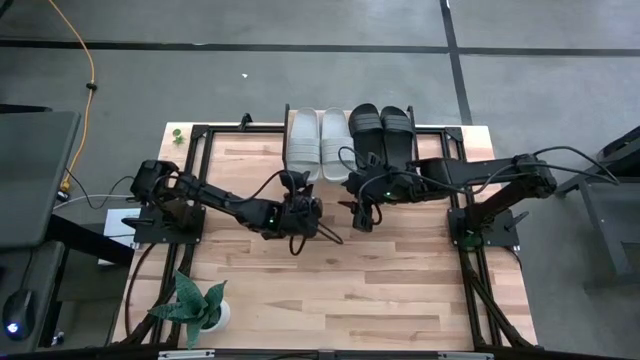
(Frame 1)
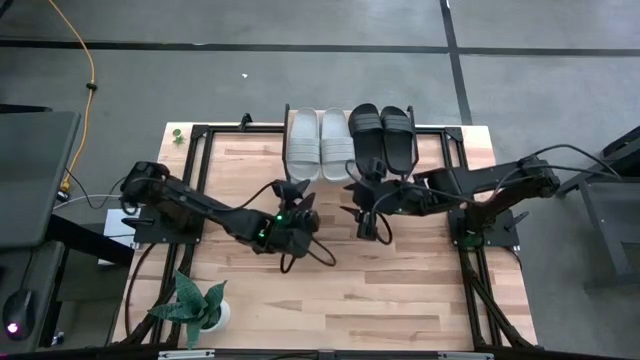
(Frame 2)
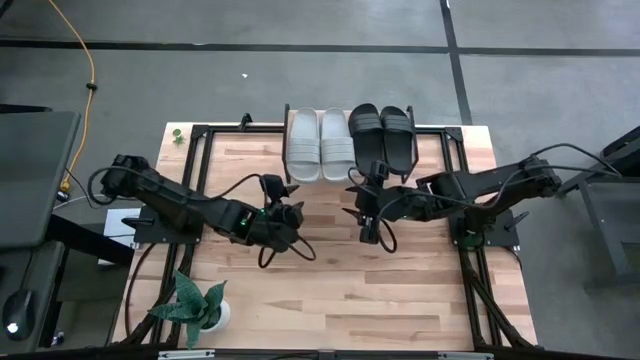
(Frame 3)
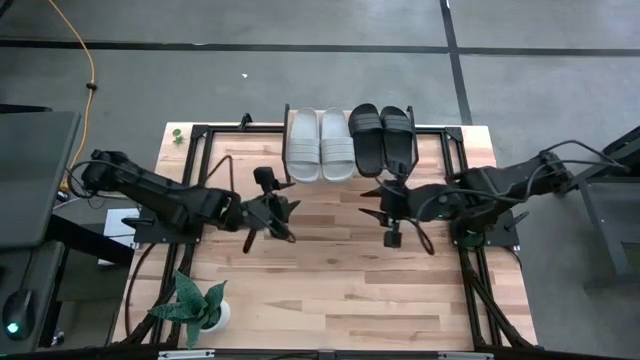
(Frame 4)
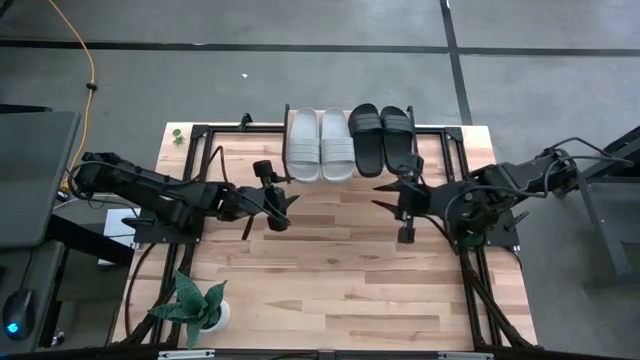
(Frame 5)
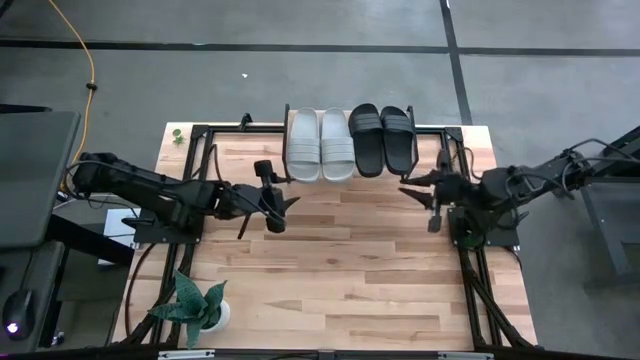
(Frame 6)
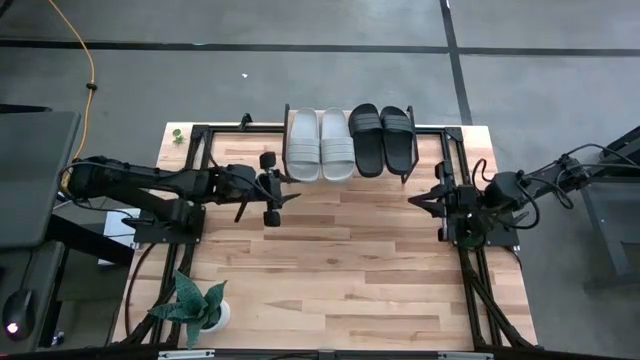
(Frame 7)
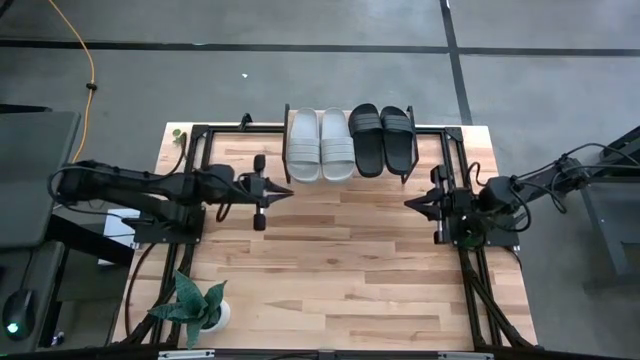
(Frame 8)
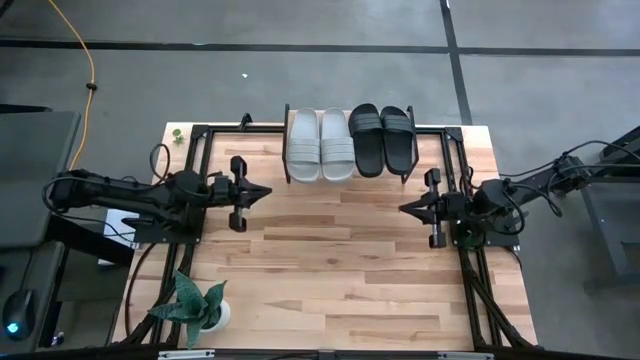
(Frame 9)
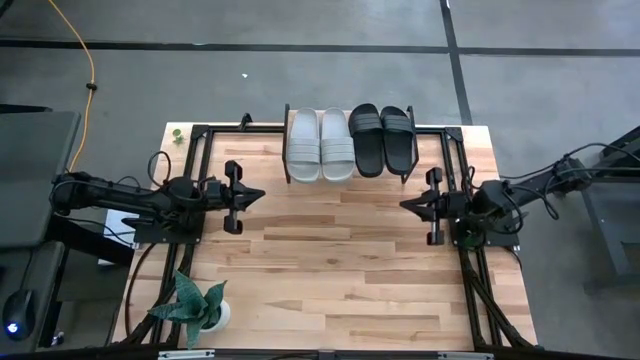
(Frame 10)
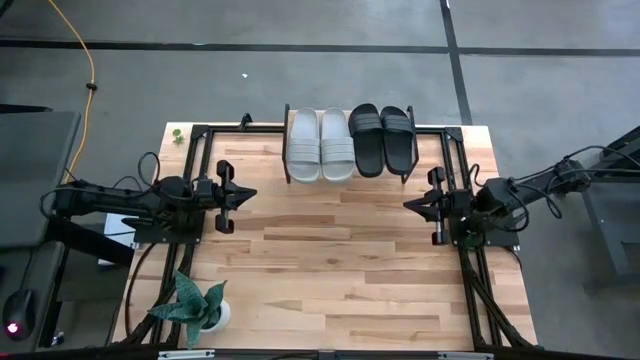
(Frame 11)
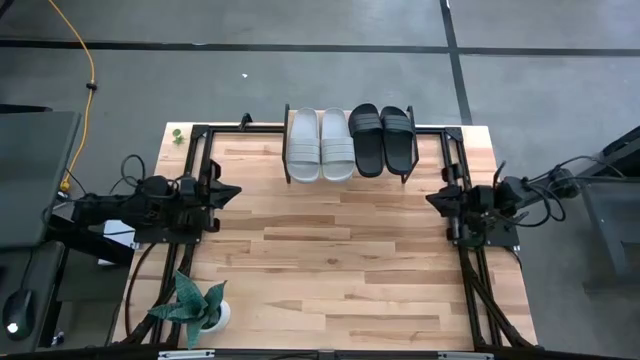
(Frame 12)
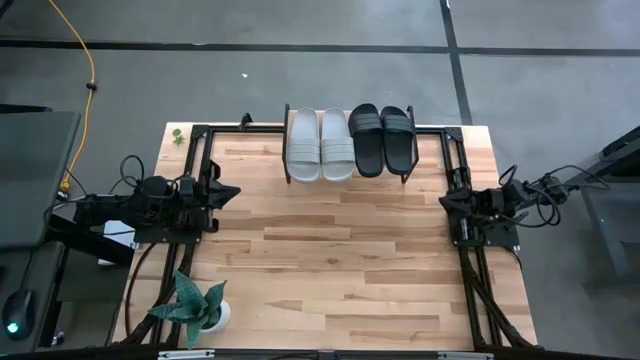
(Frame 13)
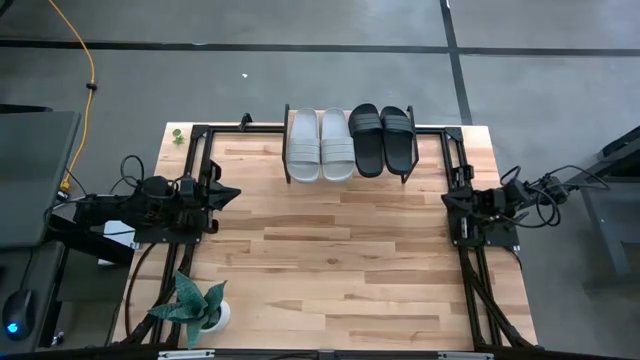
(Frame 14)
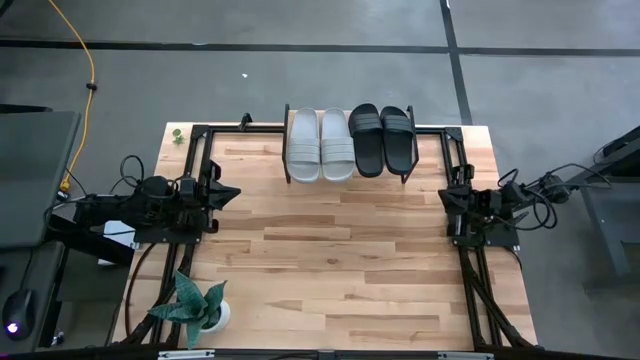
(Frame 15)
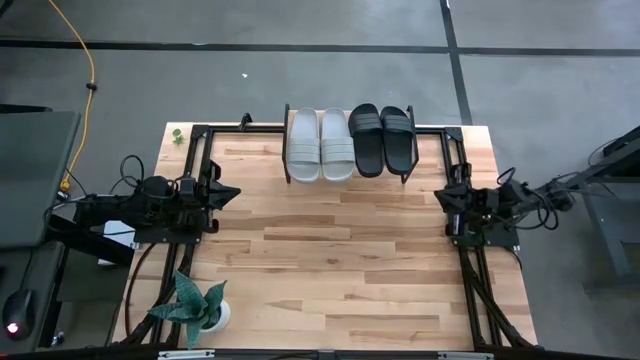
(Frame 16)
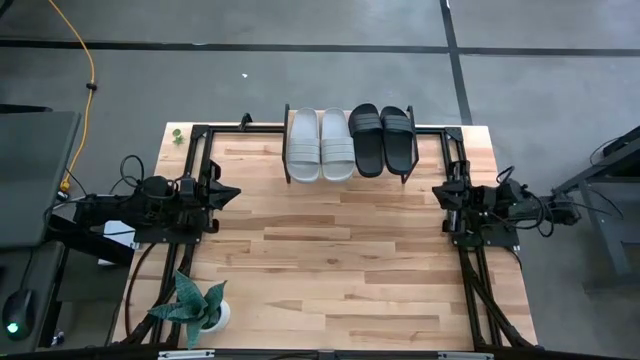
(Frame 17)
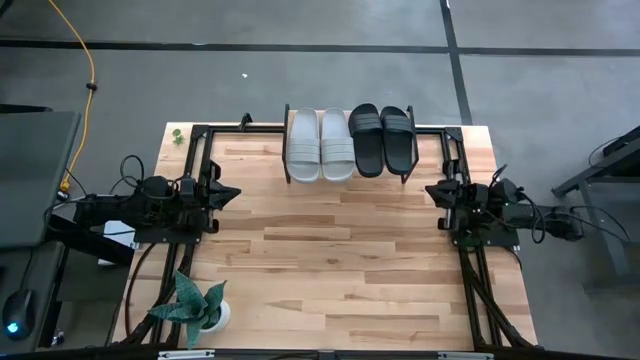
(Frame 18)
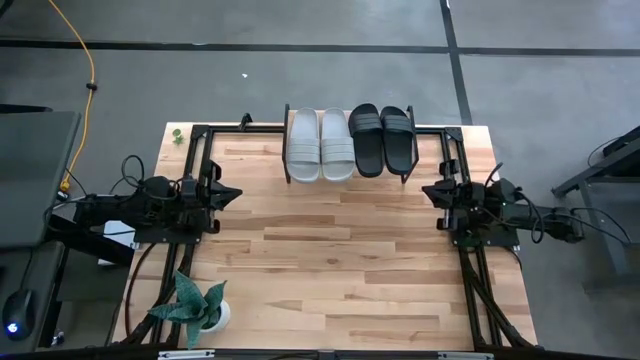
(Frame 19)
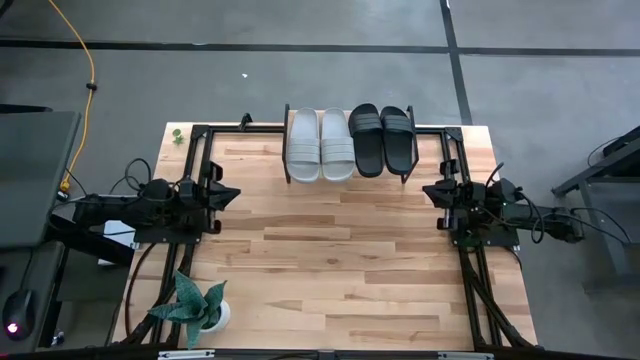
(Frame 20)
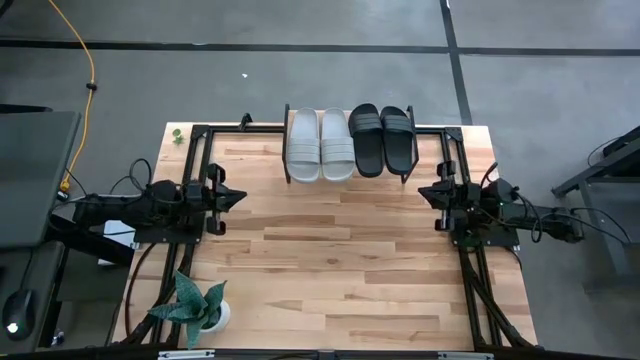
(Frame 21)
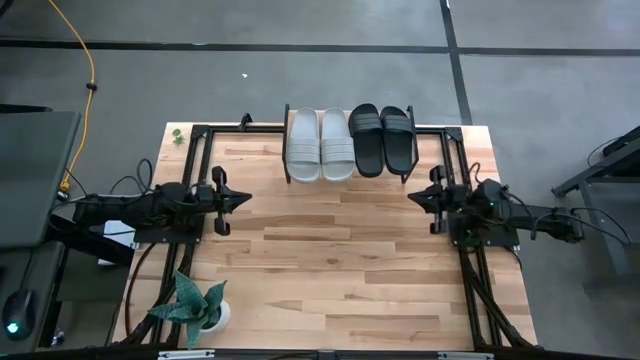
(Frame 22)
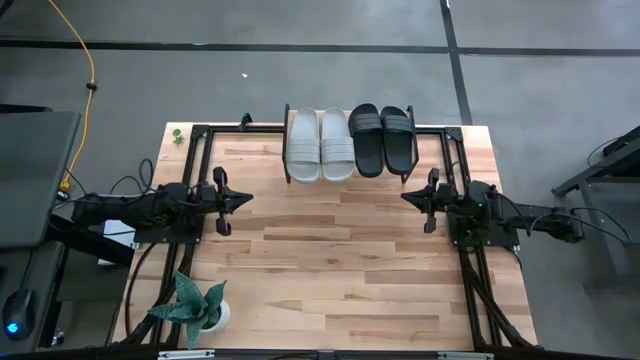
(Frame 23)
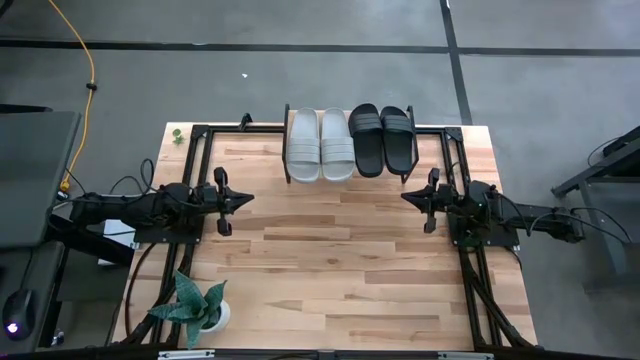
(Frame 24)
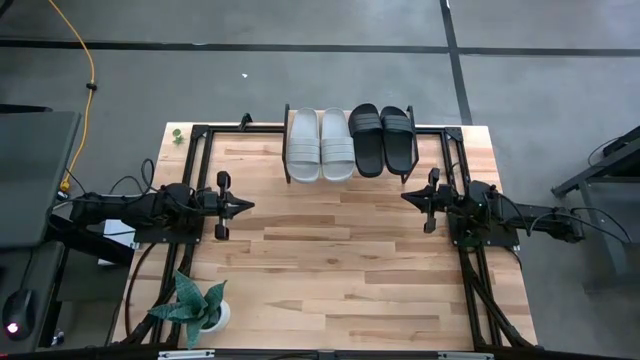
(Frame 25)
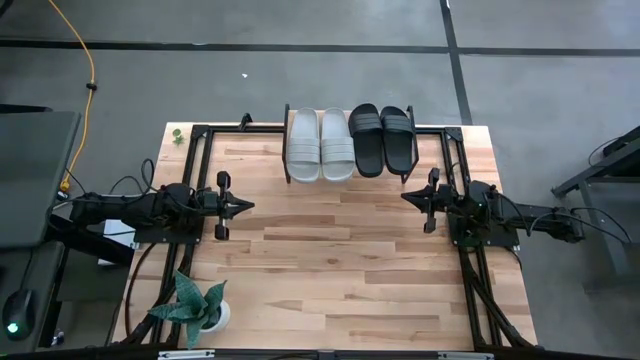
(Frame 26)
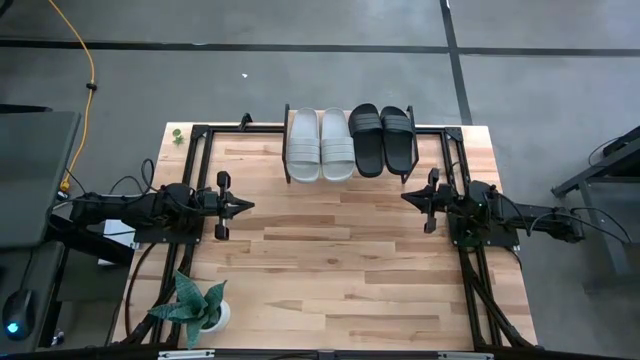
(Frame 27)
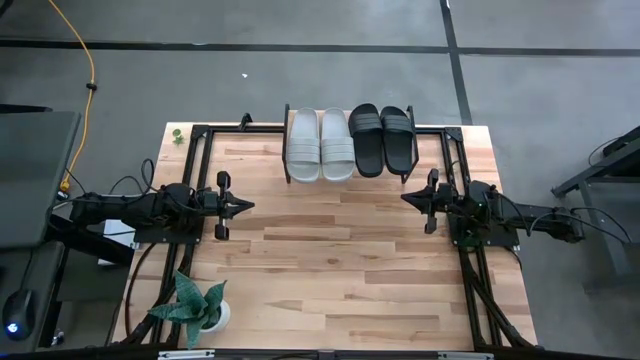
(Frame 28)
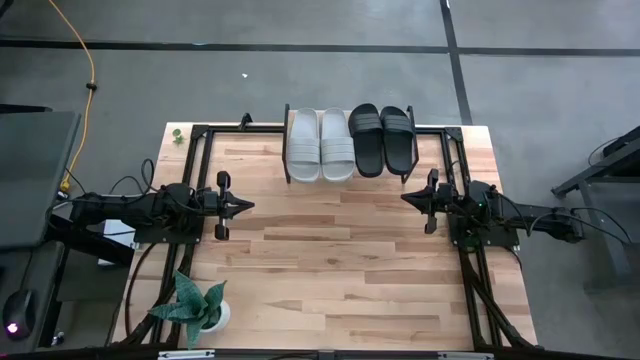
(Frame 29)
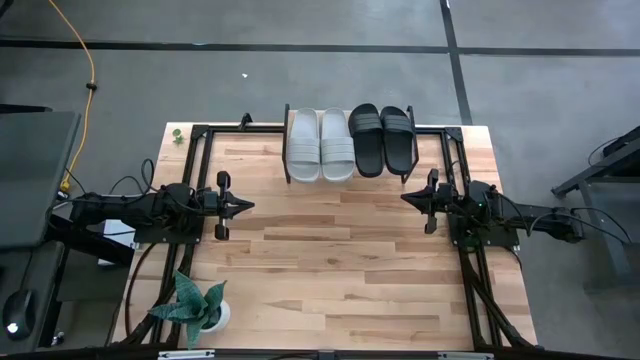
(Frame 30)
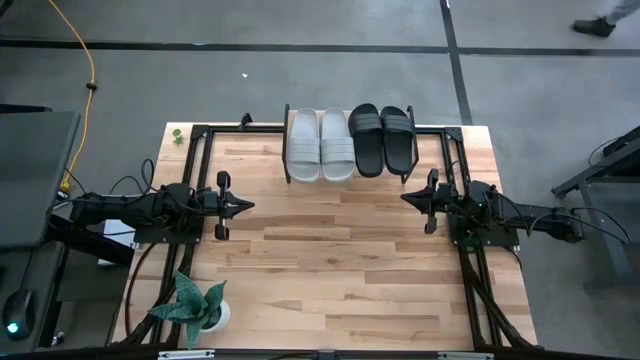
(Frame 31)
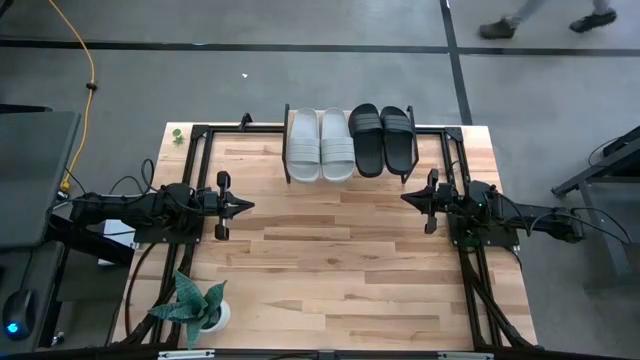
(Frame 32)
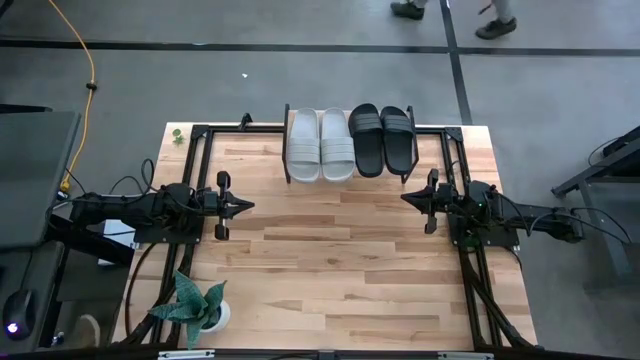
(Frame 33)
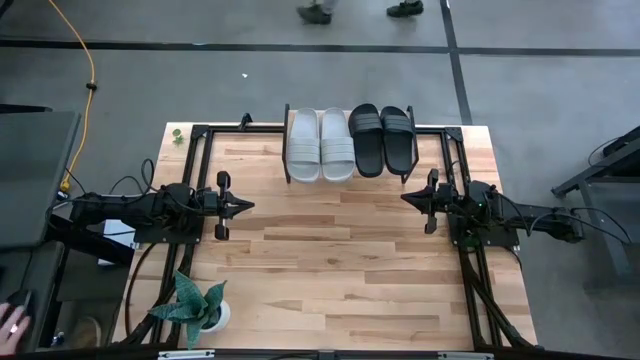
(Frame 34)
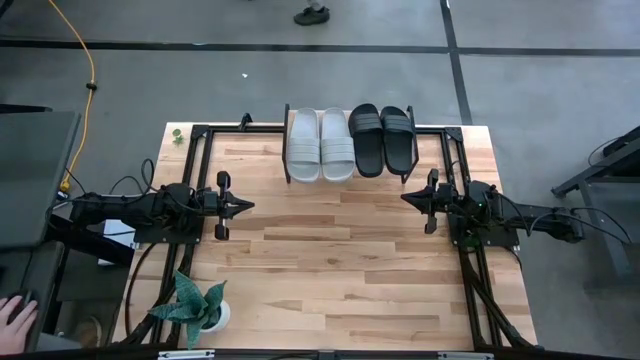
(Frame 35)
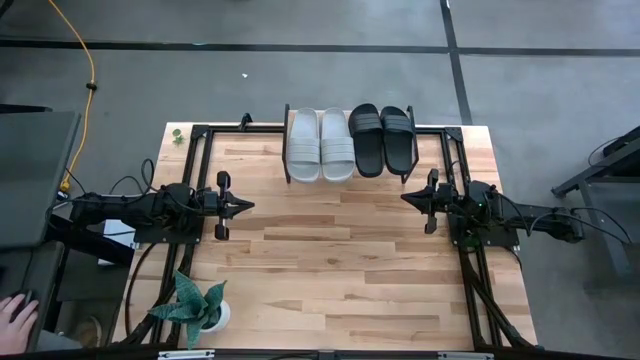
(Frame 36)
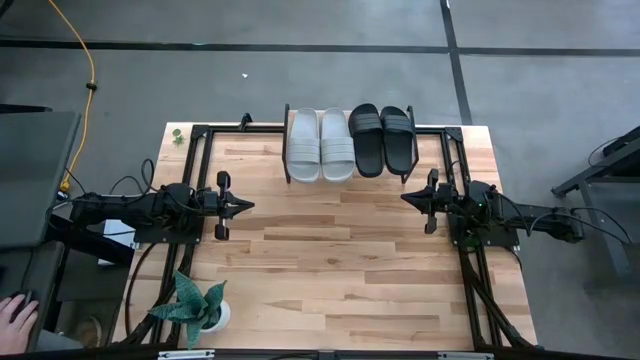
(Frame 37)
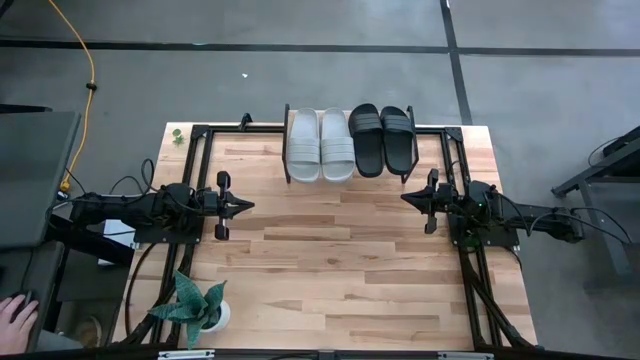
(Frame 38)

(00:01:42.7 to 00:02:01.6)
Task: Pick and place slides into the shelf
Return to Home Position

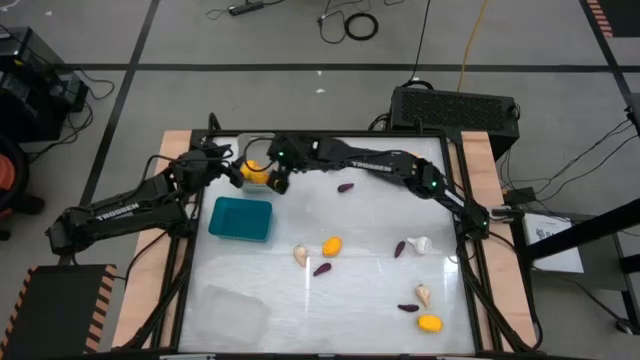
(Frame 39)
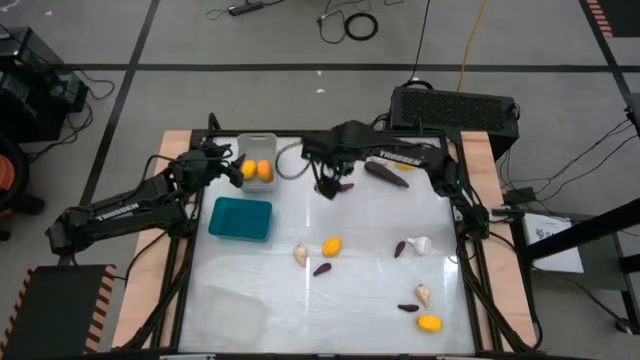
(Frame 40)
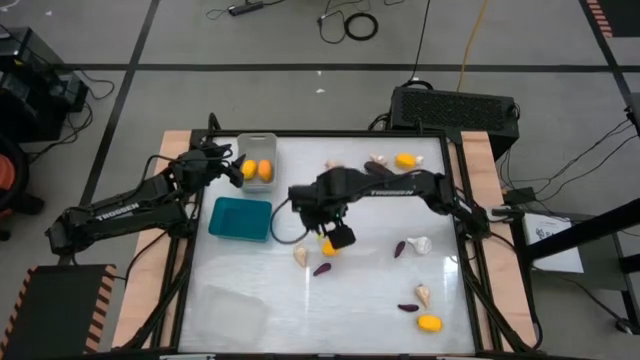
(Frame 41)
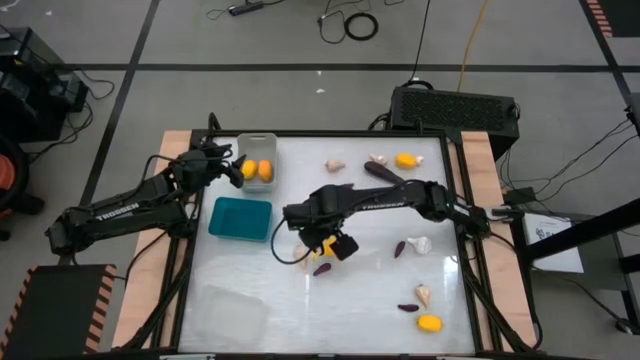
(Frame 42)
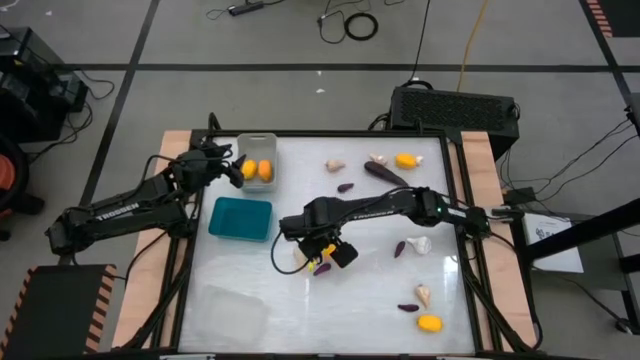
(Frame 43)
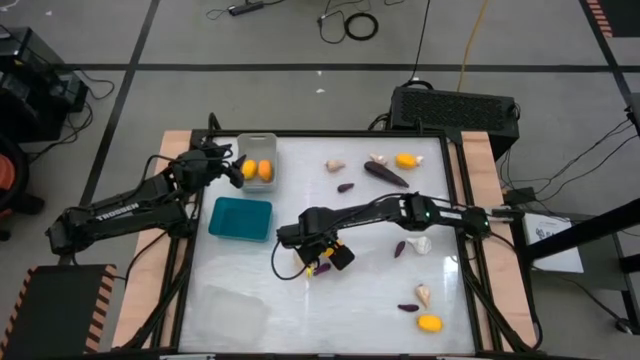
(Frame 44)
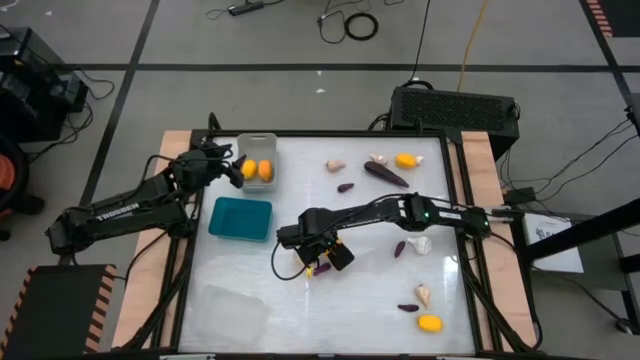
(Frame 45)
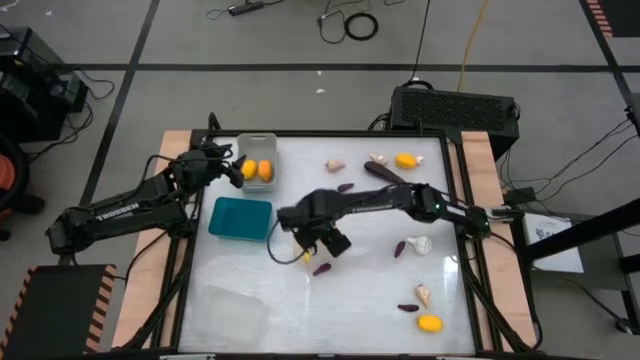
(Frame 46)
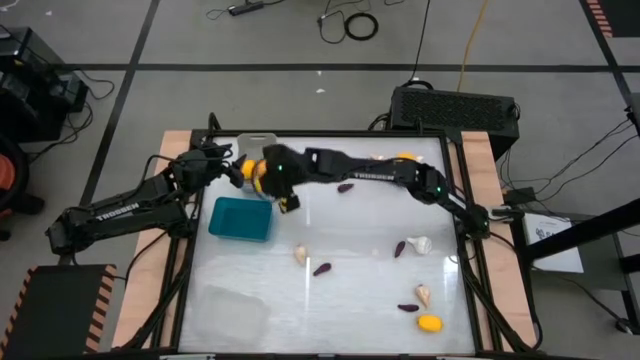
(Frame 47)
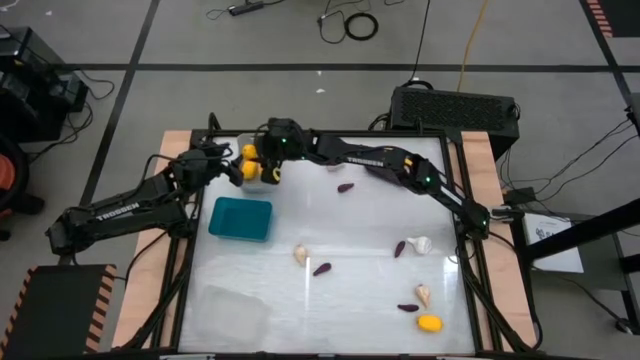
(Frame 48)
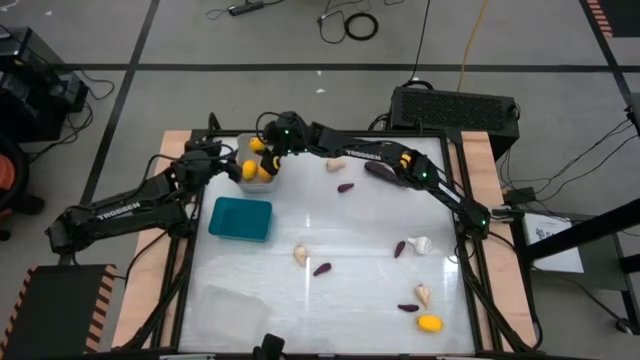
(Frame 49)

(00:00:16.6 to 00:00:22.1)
Task: Sort produce into baskets
Put the yellow lemon into the gray bin
